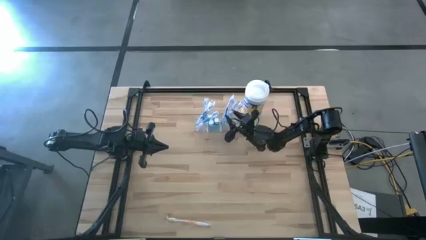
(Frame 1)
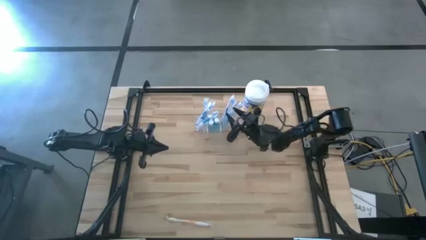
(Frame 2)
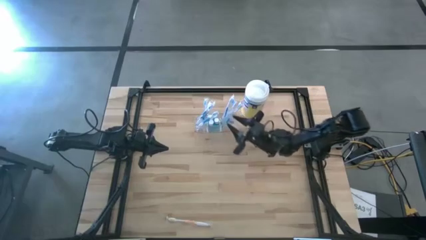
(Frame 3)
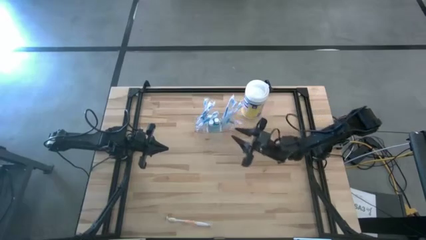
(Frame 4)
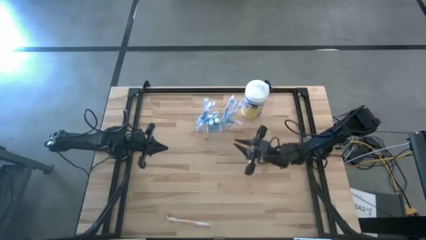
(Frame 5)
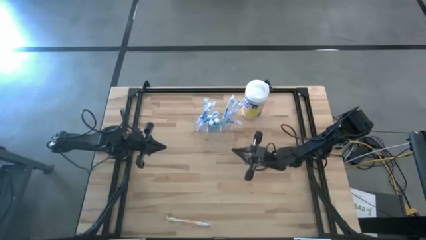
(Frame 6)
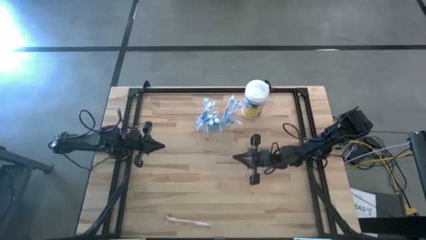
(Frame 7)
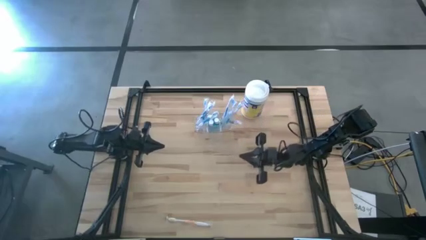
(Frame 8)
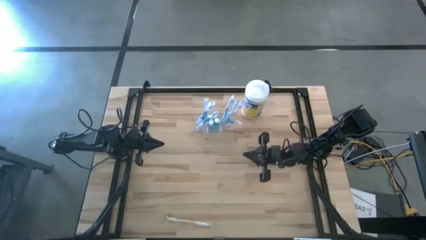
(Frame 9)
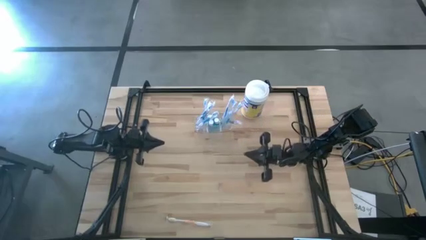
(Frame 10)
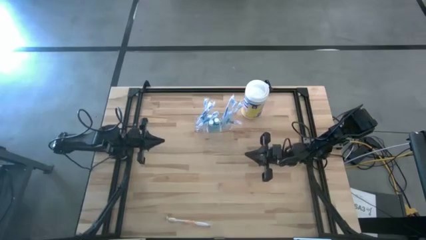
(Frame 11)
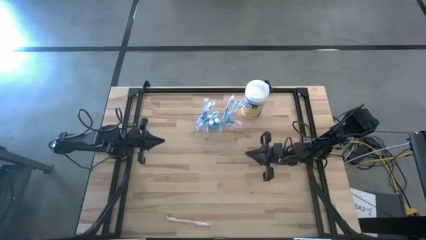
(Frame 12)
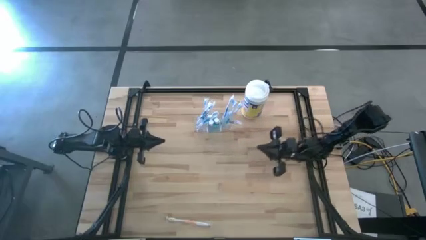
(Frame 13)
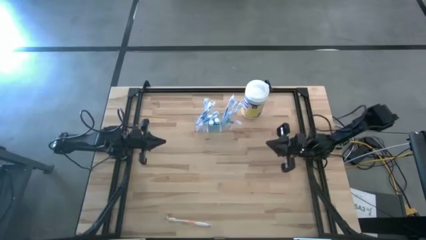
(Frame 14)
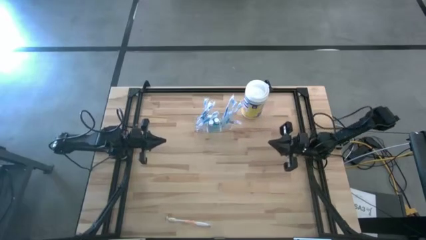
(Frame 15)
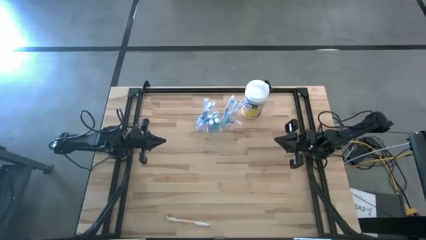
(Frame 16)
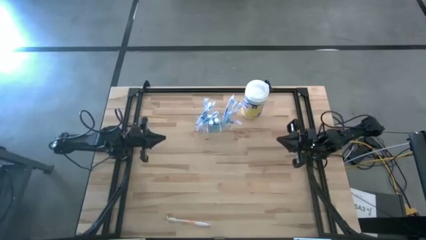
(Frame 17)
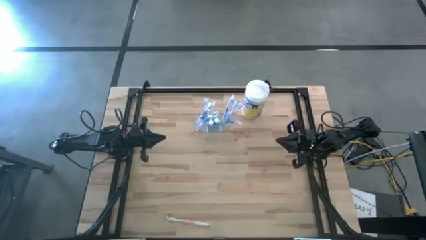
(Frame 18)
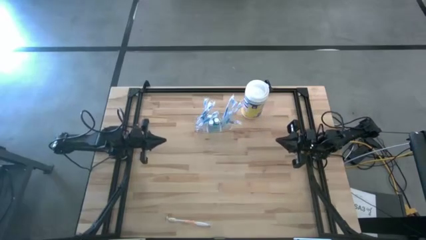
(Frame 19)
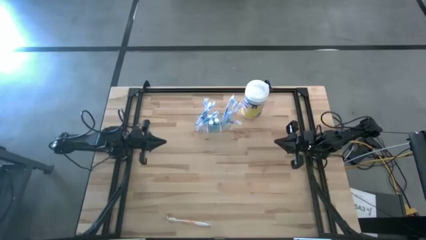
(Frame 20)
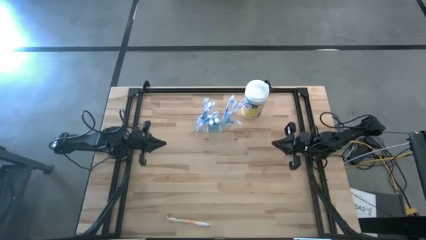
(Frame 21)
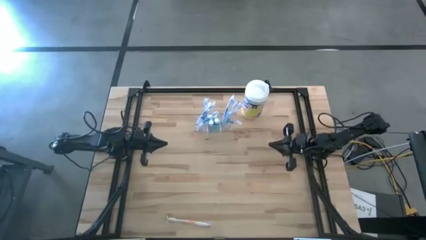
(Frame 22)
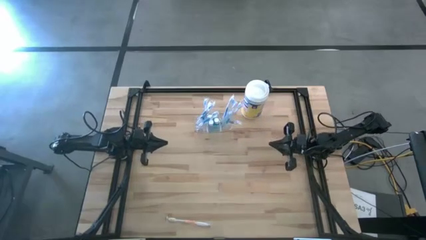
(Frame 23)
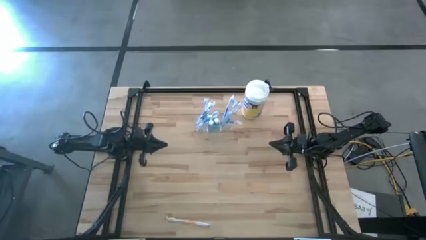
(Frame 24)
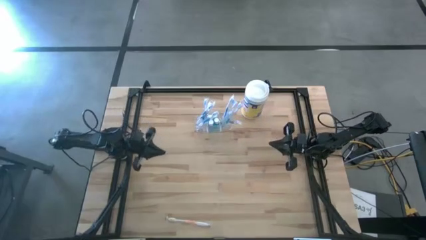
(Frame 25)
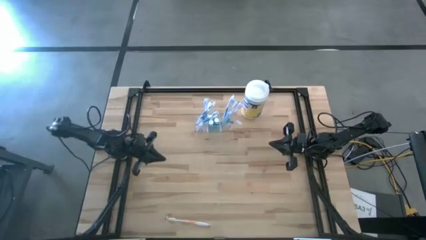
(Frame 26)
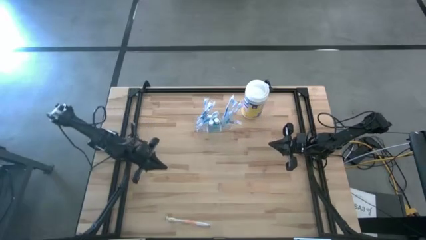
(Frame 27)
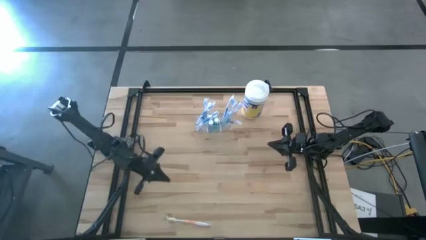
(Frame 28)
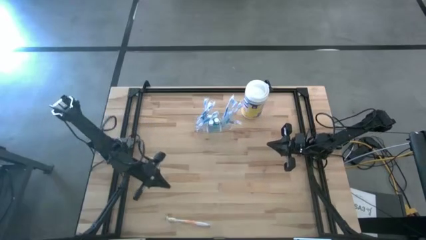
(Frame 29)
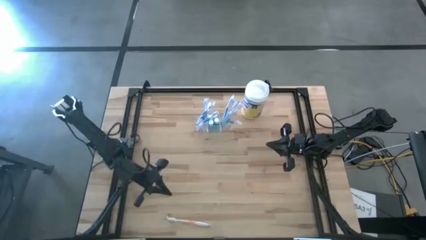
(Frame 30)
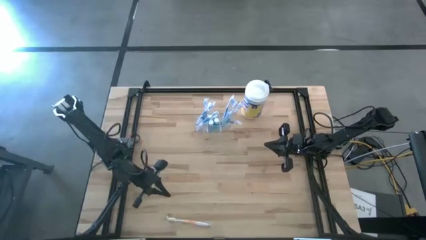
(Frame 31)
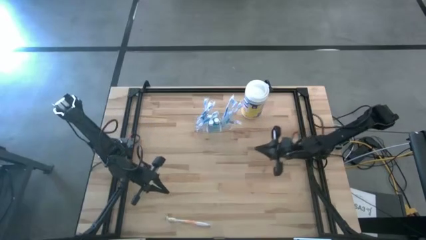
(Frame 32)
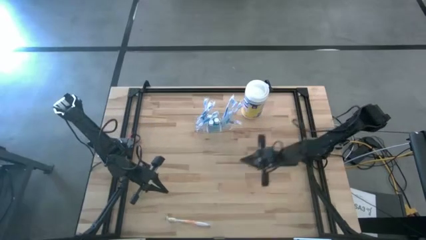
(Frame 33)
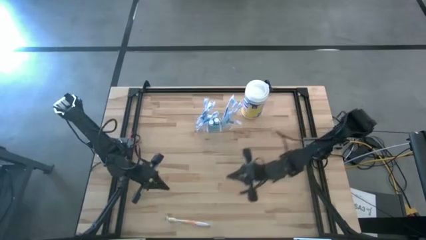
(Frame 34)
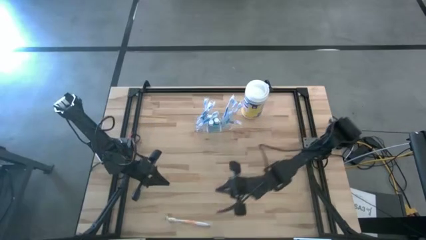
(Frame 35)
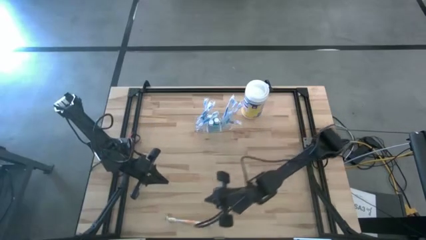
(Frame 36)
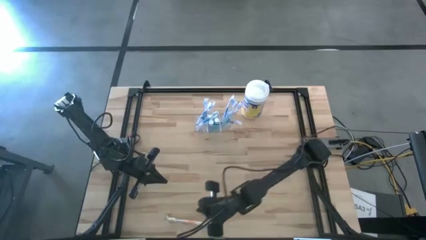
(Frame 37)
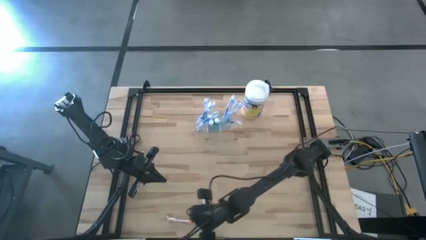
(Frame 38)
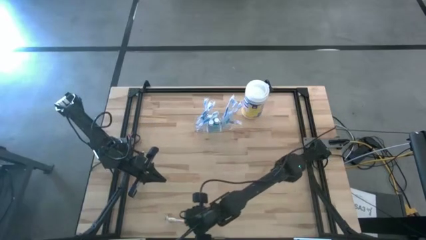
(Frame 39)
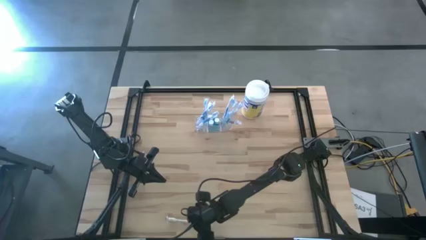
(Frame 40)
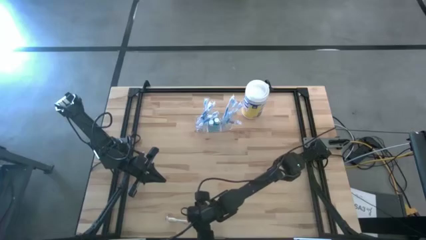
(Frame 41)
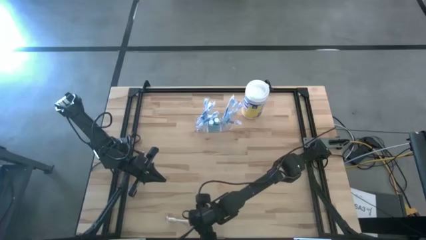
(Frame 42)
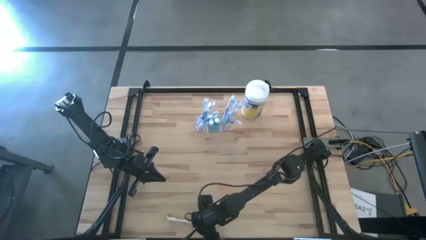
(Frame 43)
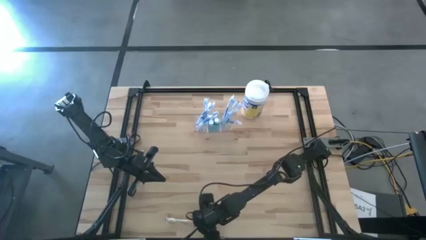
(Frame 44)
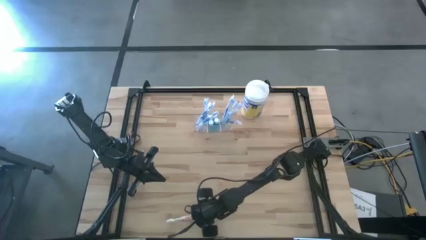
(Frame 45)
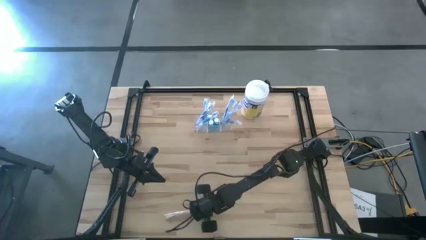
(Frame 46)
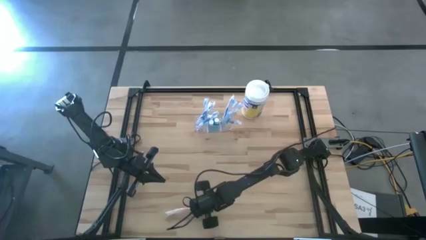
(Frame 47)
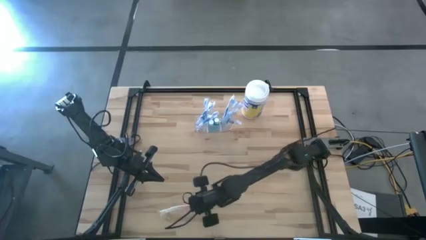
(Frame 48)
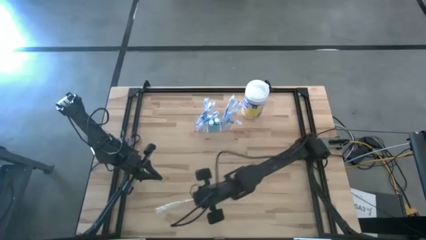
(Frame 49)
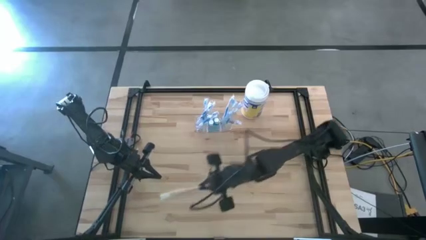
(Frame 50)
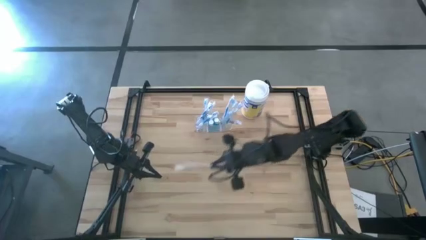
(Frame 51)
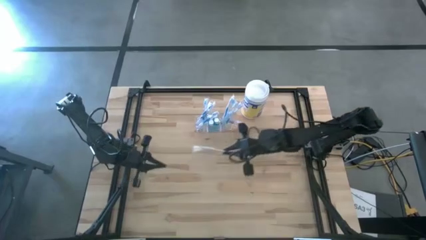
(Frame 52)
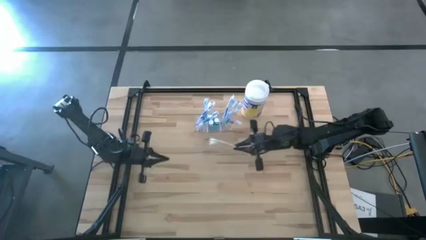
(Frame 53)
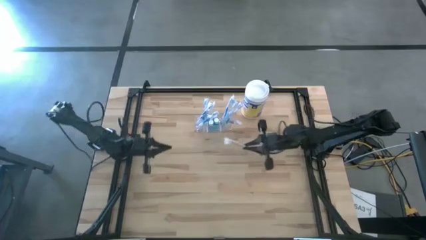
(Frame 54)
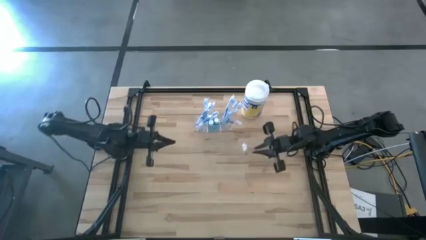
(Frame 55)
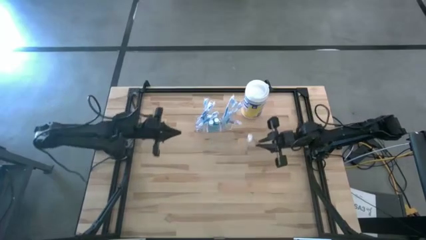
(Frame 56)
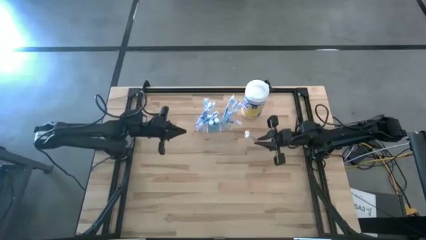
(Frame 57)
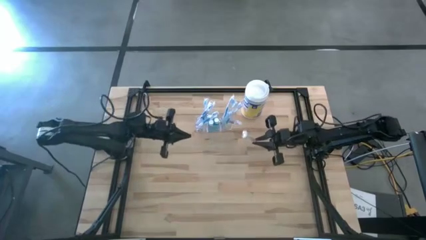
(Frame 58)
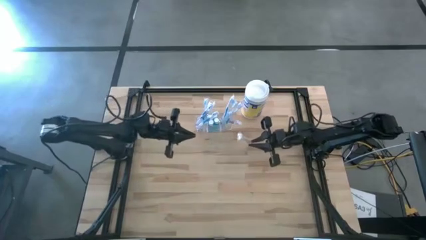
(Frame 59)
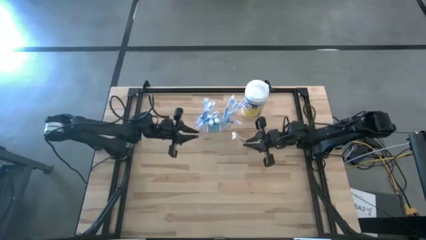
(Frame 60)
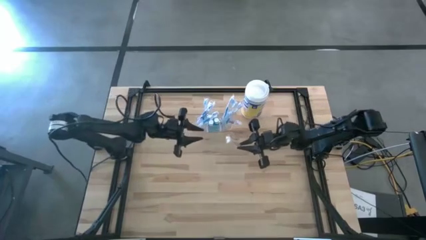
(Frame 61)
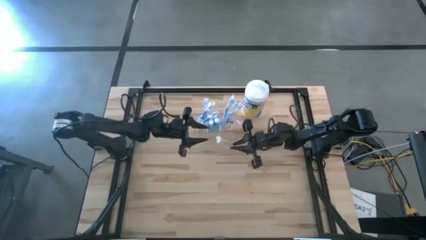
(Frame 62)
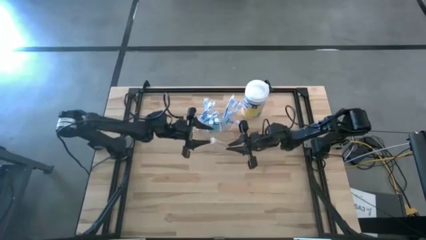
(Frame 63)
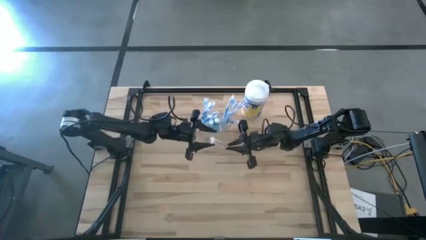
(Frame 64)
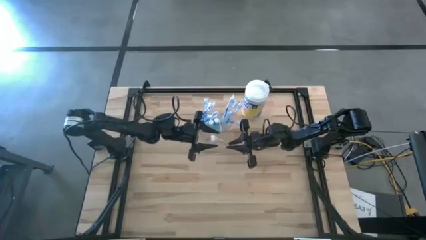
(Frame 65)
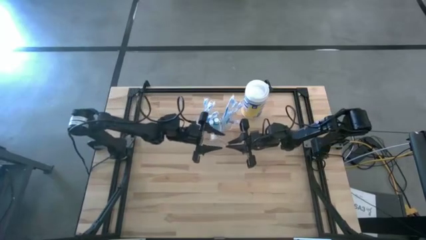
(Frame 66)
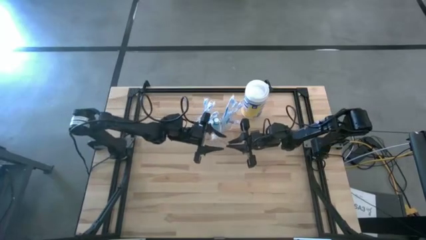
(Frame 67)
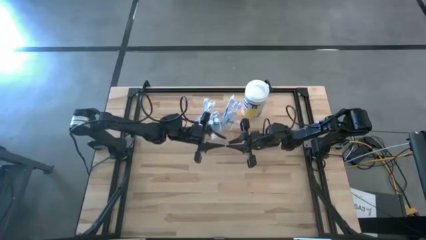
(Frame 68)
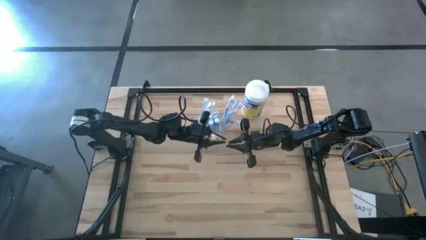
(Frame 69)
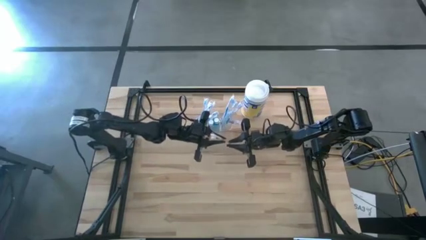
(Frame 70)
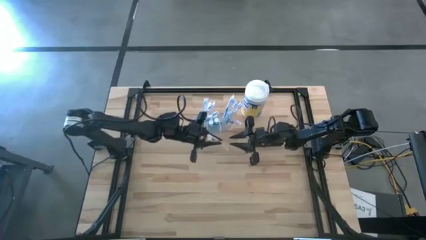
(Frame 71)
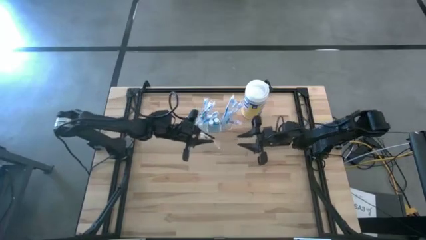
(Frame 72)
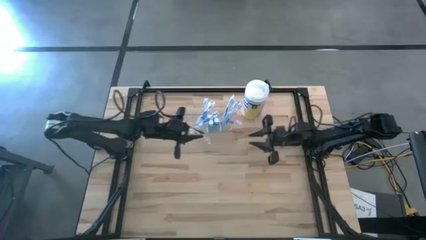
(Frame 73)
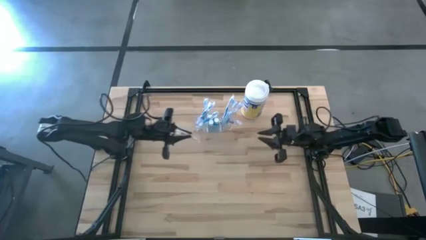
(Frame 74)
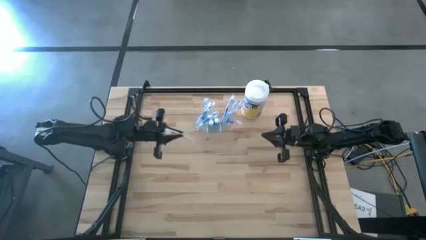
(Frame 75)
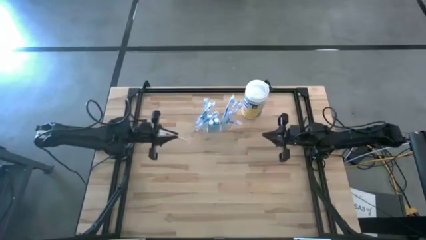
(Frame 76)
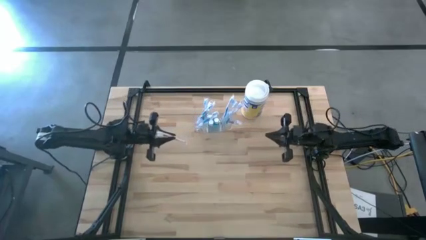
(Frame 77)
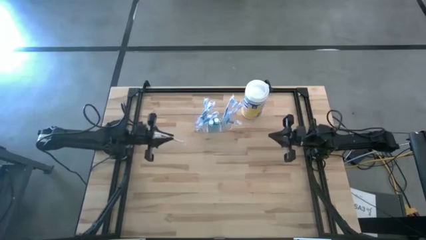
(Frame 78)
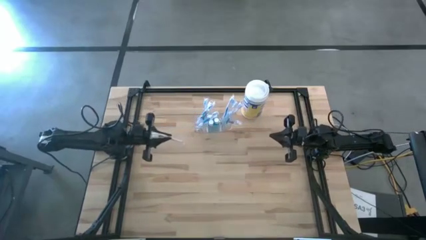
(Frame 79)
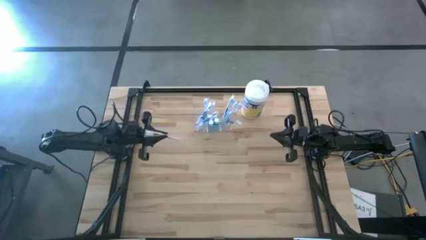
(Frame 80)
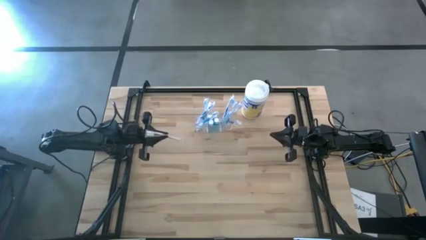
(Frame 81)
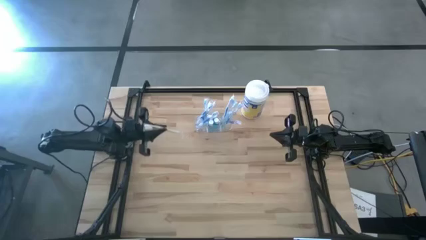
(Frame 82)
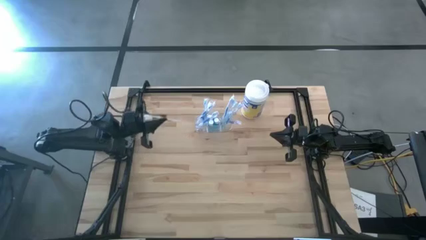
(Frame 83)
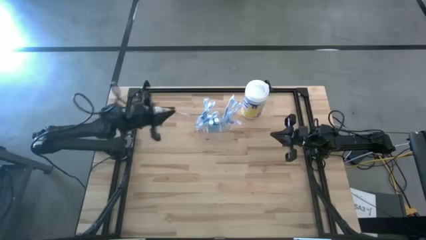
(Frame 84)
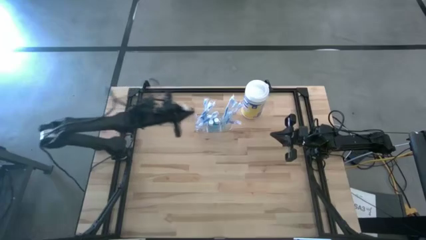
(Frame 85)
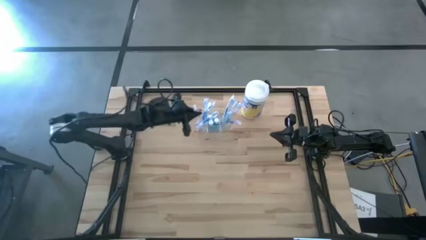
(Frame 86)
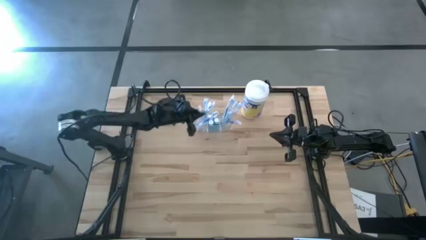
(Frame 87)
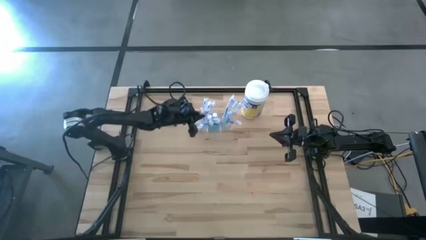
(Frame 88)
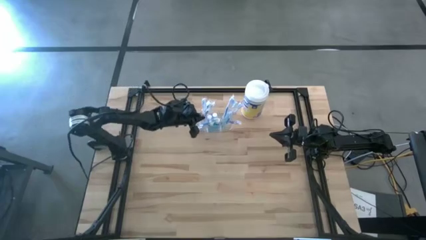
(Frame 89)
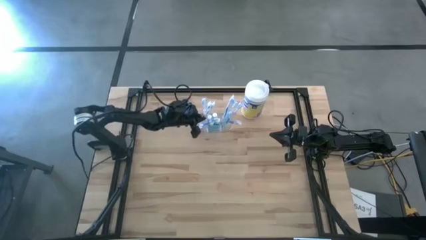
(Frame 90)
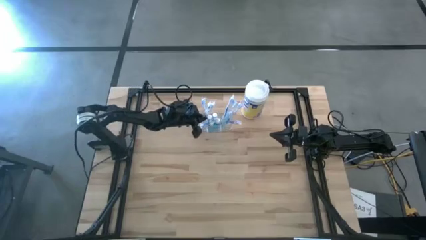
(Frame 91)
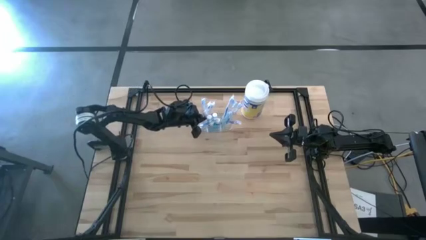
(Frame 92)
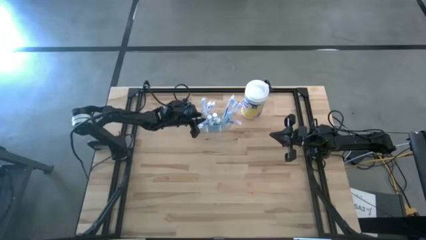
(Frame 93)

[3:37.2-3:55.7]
Task: Pick & Place toothbrushing station
Put the orange toothbrush into the left section of the transparent organizer
